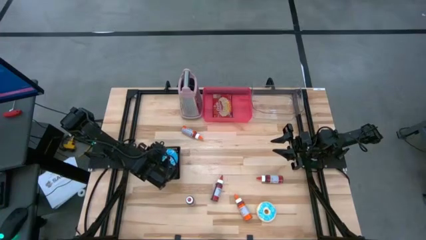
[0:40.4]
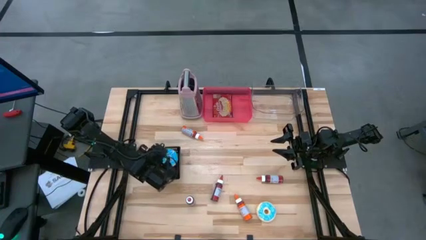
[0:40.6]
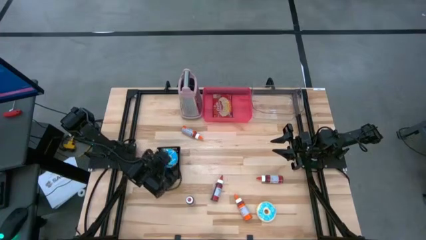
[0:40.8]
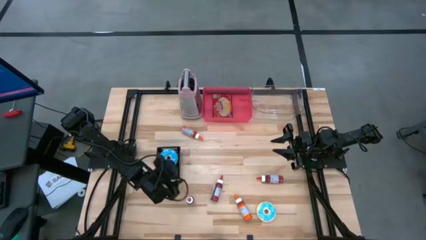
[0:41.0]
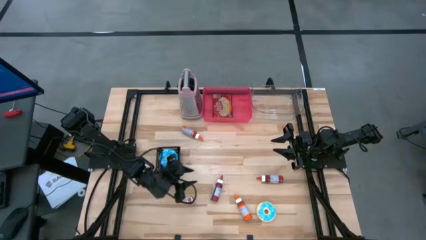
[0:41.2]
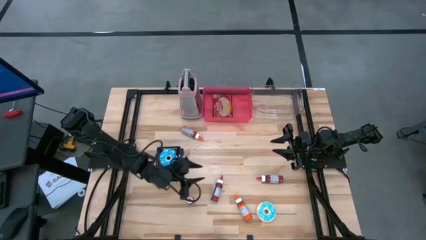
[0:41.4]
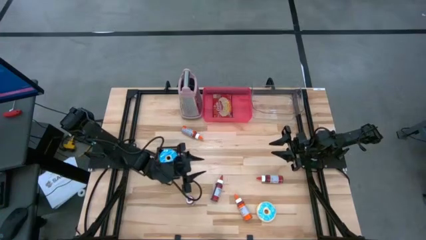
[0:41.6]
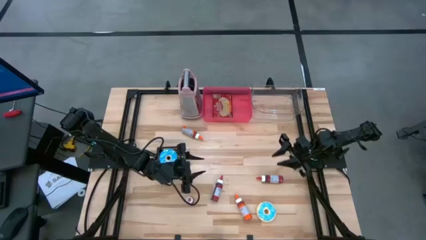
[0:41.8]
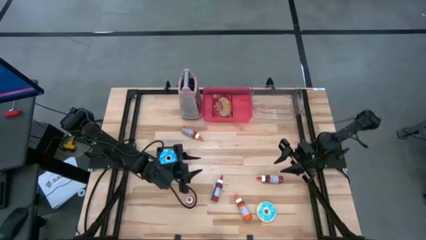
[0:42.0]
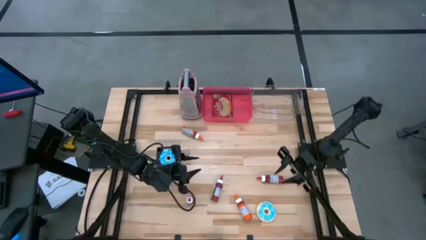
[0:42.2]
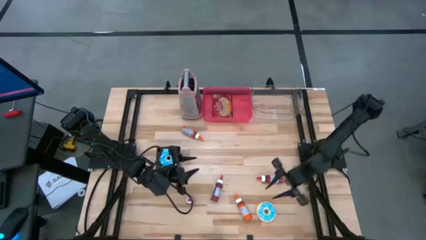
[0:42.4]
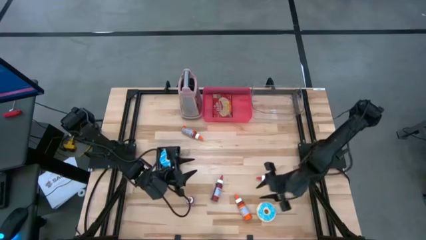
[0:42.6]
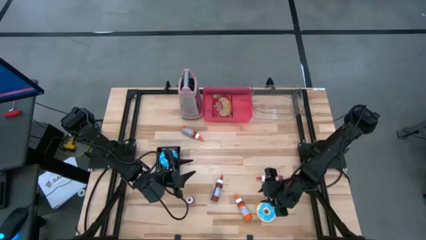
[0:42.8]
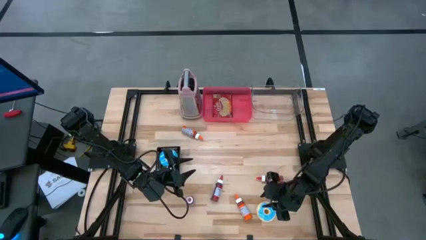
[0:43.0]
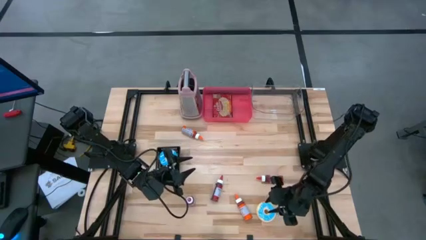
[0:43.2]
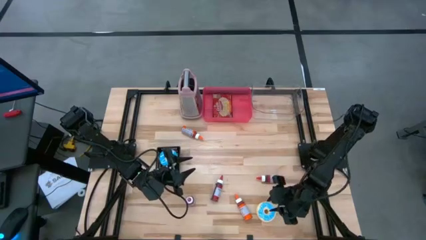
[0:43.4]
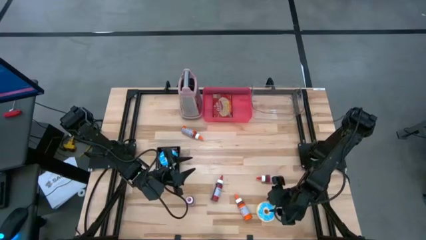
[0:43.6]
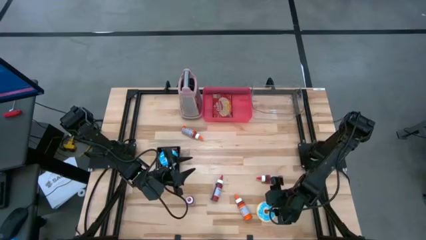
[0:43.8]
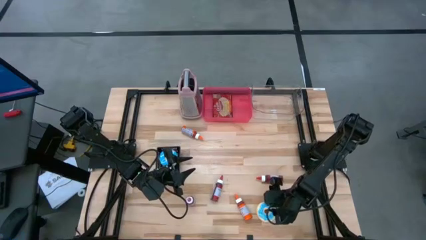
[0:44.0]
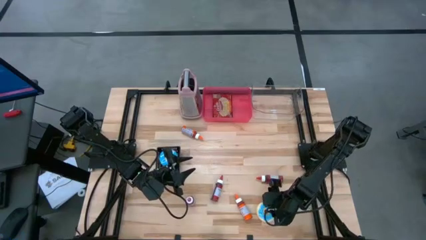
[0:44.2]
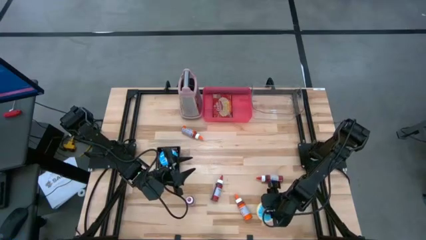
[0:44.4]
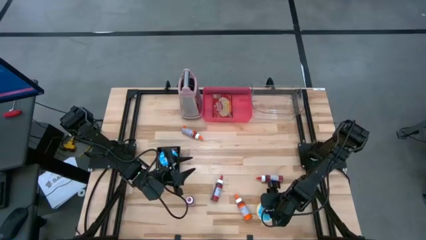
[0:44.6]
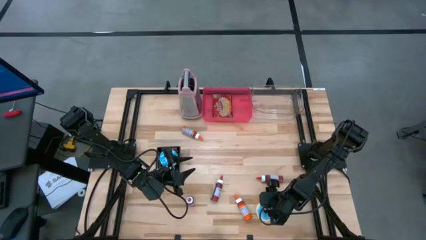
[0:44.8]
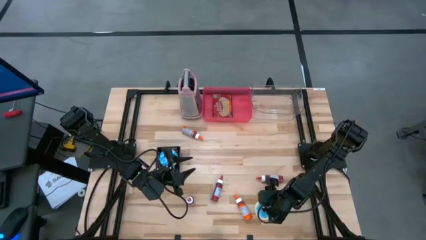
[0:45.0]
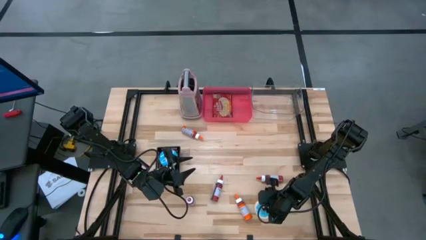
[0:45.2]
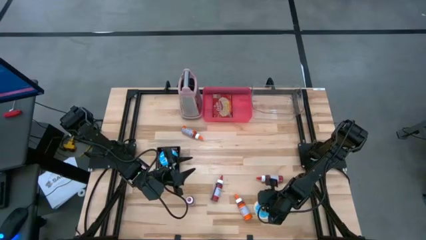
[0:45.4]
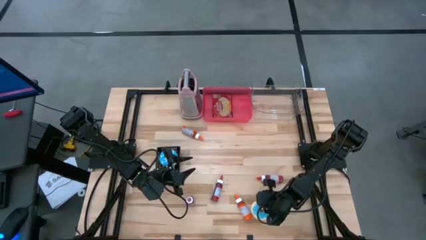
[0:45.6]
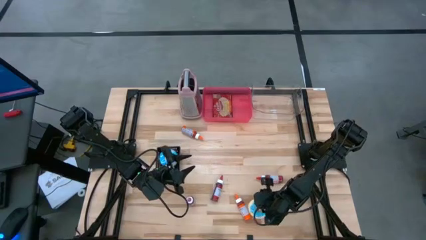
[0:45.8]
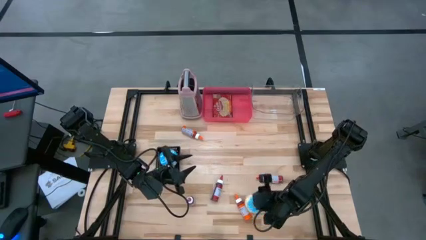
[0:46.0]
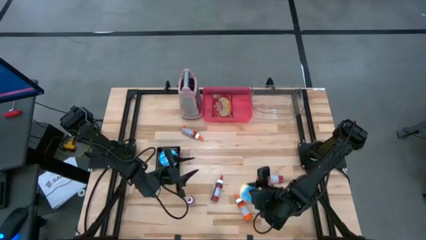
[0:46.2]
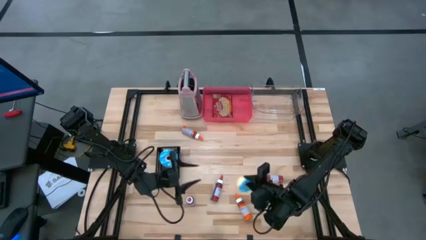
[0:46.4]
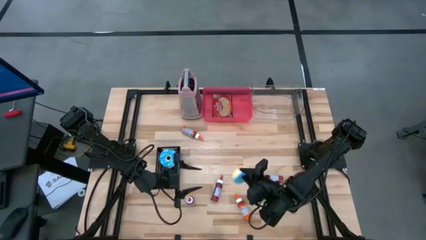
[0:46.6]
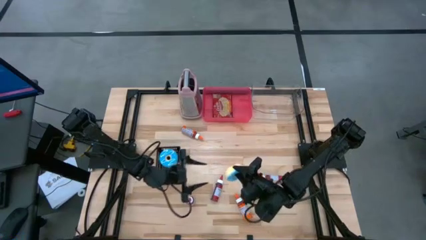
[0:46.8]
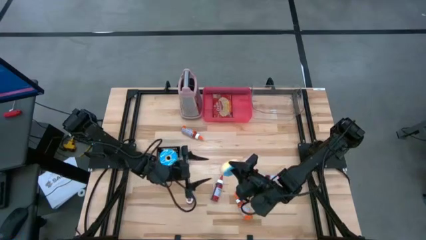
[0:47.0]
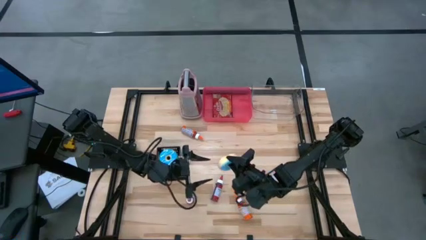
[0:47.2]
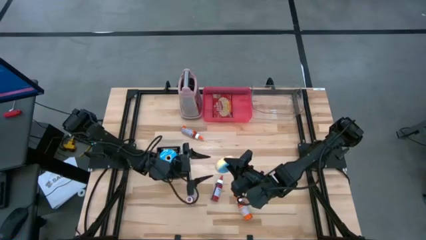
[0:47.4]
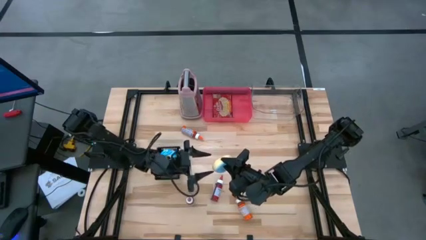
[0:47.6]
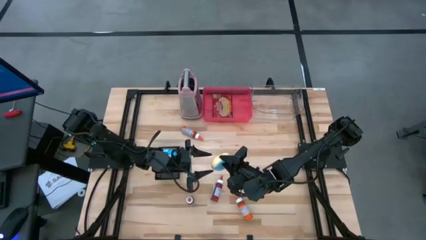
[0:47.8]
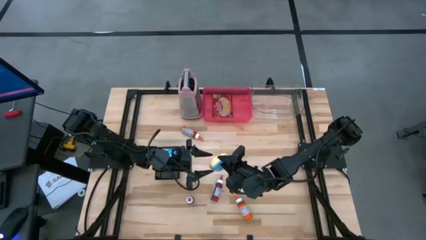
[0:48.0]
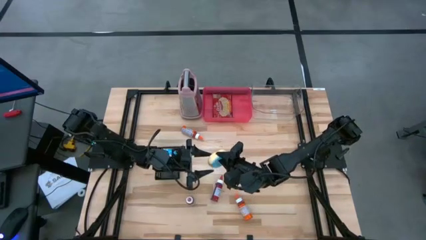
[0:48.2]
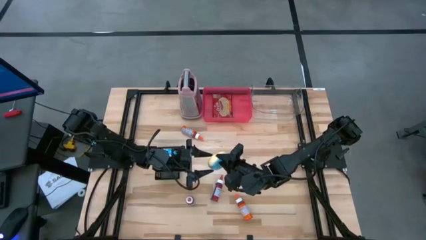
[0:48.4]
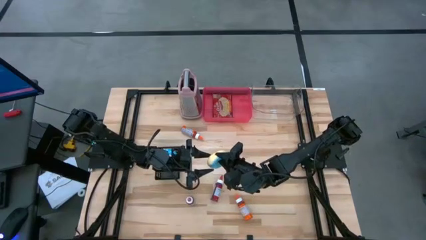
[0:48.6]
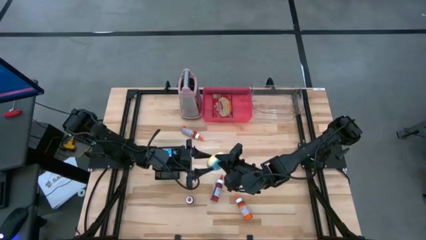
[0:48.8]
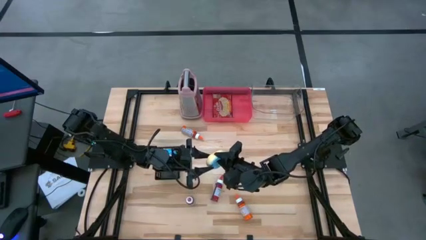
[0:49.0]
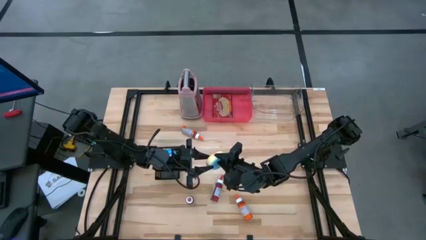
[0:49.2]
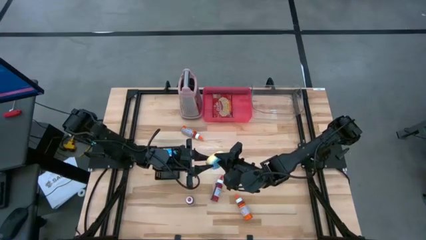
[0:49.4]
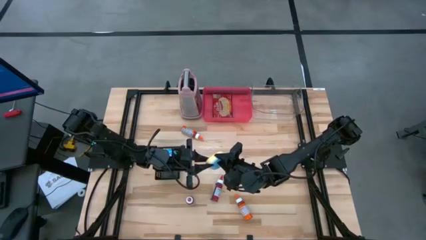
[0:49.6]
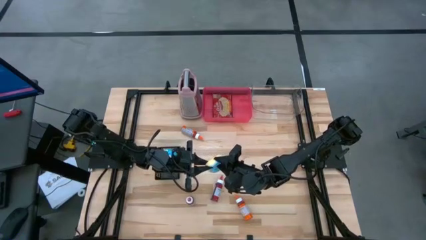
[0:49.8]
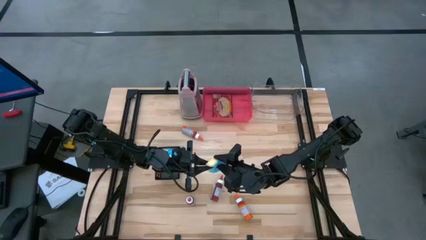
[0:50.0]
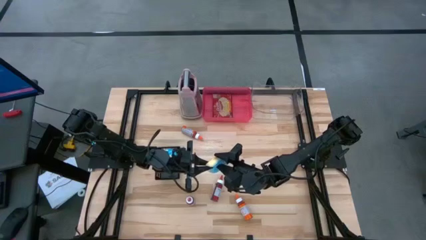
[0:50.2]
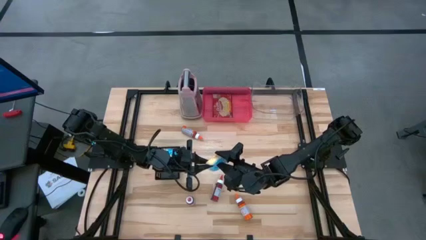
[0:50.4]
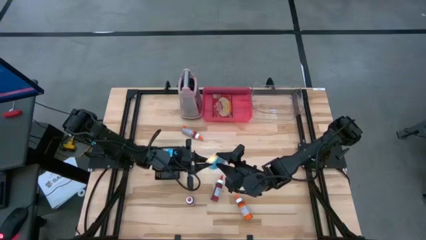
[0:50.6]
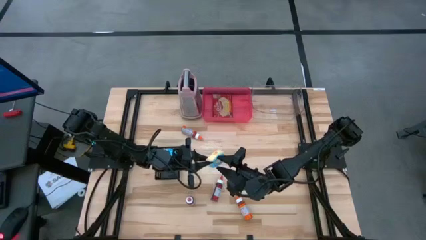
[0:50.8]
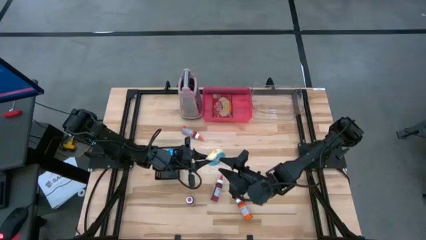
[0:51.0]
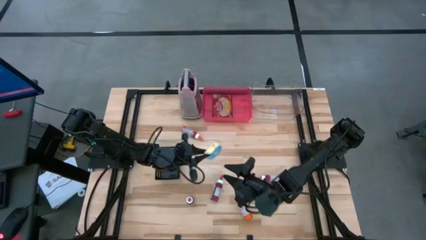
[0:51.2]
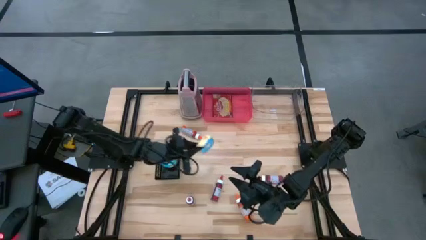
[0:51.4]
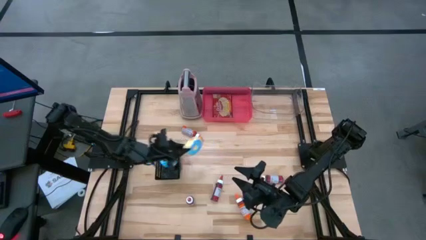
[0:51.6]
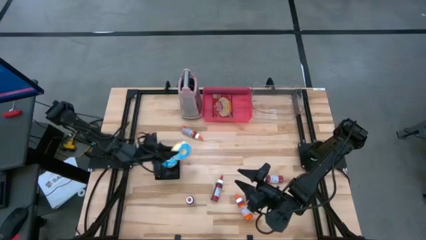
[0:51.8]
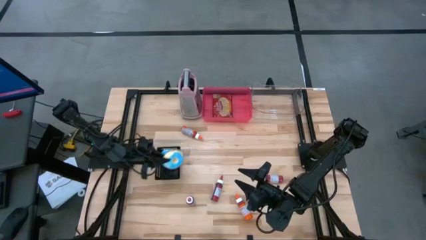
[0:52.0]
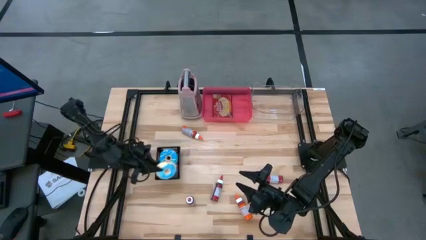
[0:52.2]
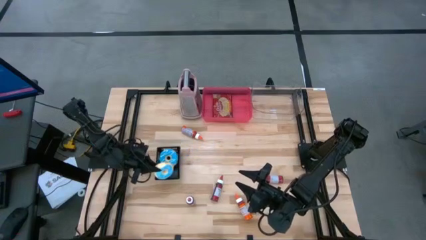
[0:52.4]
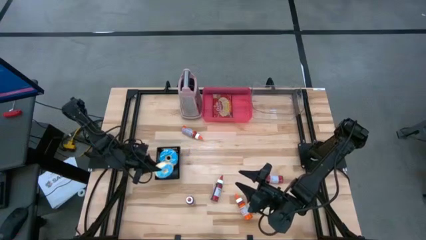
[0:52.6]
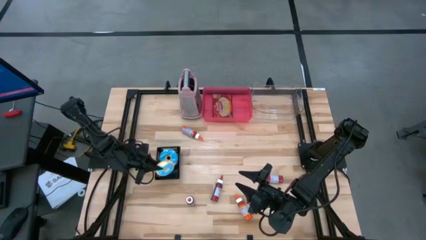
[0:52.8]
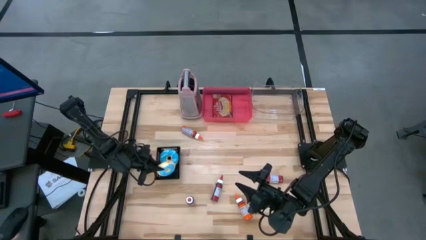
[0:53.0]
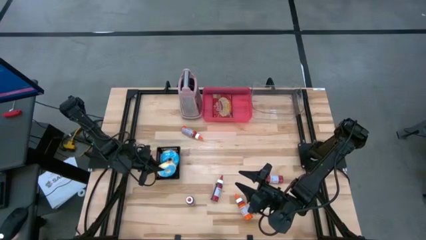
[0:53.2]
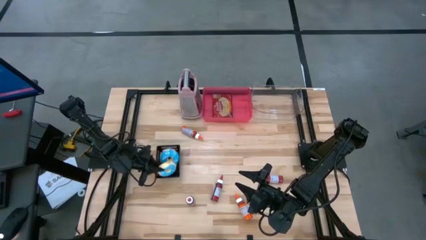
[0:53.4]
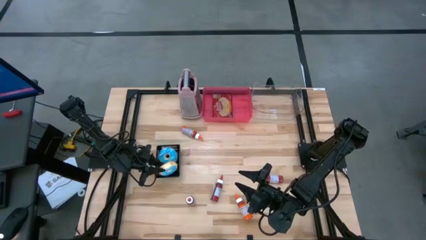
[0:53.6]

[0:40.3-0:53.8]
Put the light blue donut into the black bin

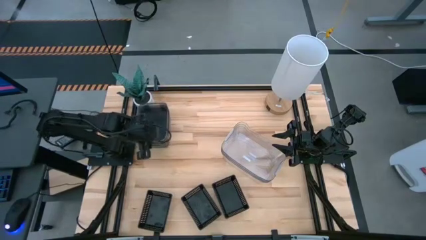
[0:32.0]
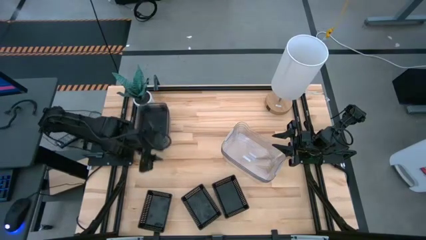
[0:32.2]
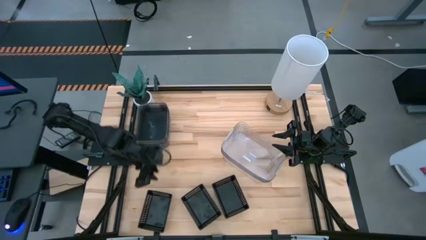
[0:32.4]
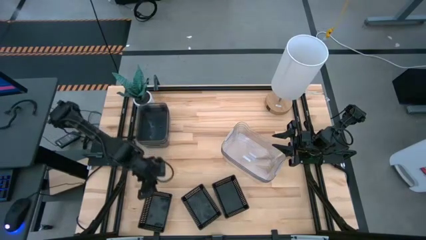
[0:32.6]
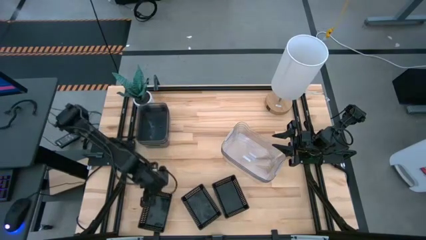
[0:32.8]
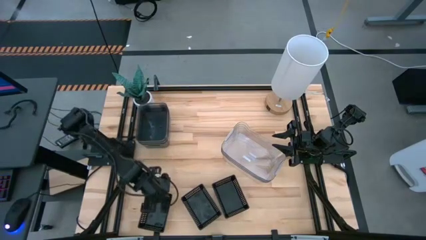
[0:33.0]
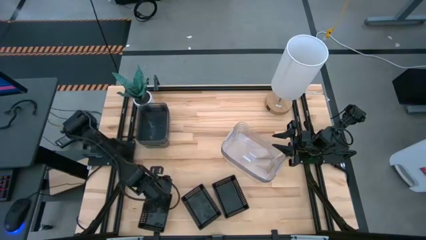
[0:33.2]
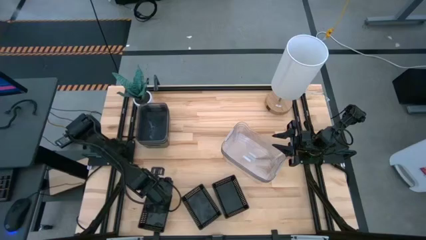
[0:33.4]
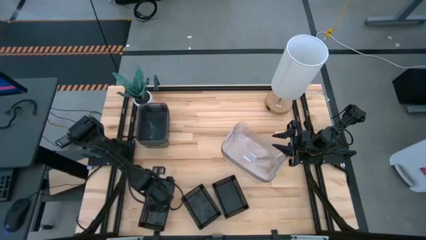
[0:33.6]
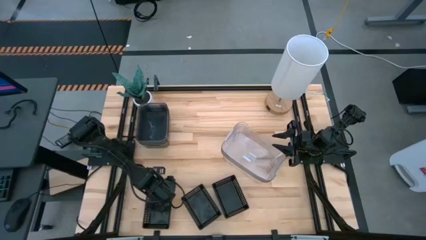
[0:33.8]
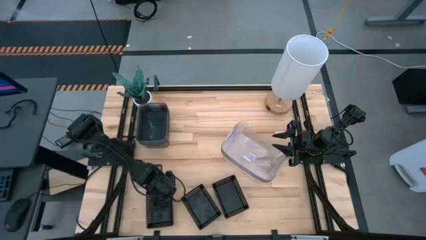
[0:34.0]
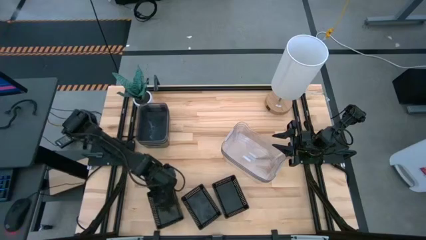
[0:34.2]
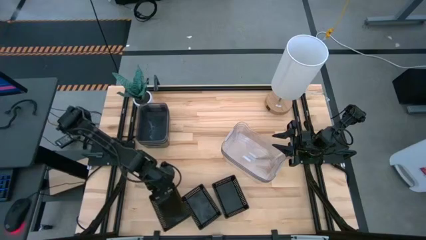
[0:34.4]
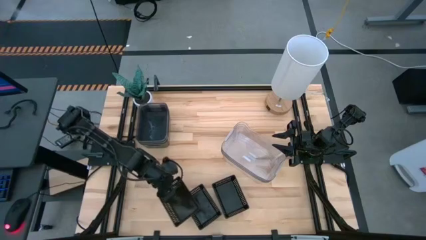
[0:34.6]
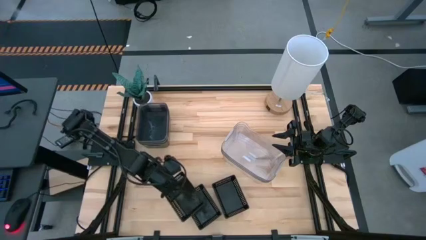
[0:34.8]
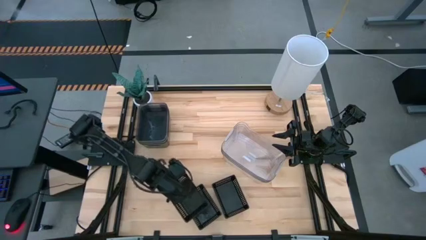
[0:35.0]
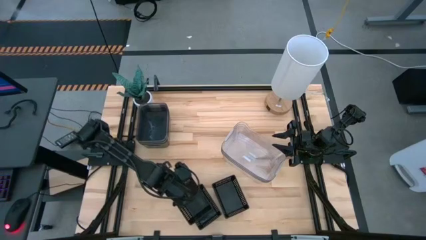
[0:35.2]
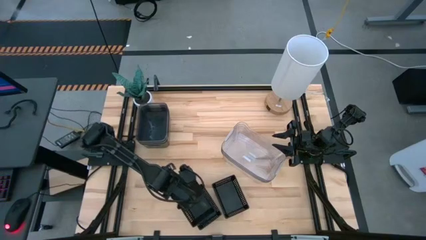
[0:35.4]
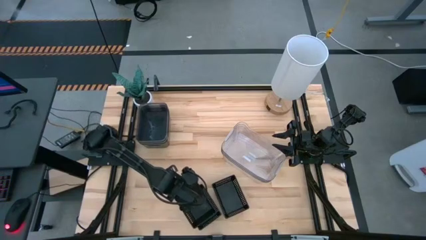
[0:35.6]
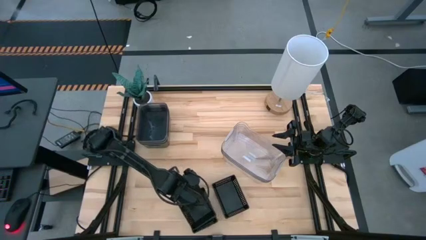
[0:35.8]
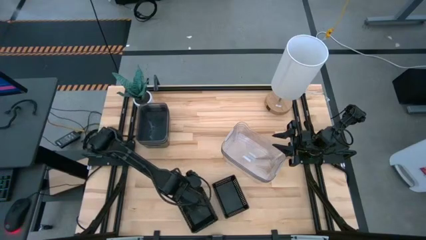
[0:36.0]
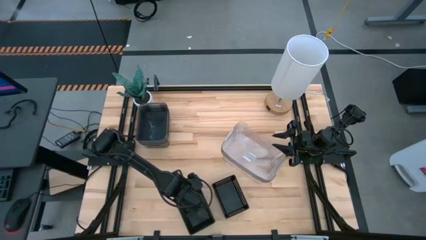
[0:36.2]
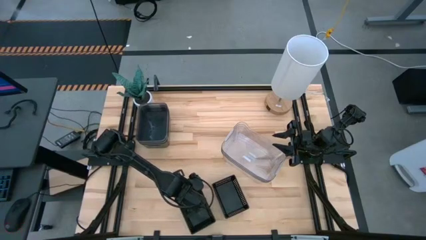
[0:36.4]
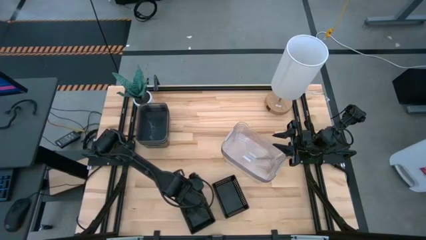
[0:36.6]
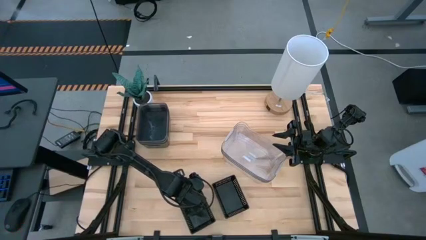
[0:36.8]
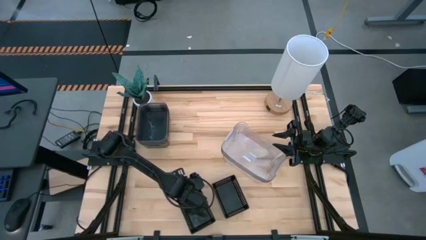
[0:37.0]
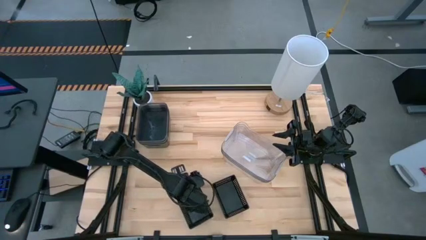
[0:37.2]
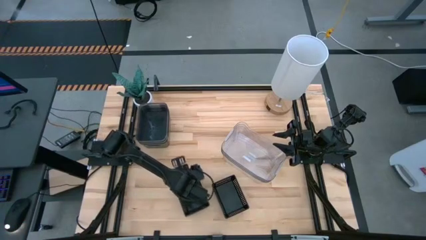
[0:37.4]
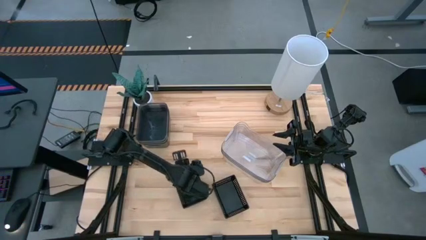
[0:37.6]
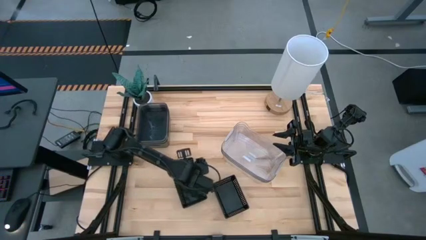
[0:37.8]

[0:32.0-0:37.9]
Stack the left black bin on the middle black bin
